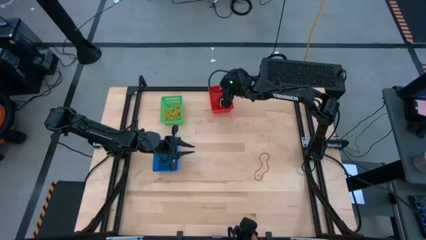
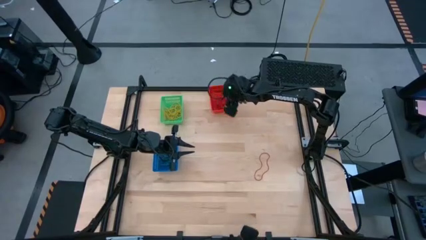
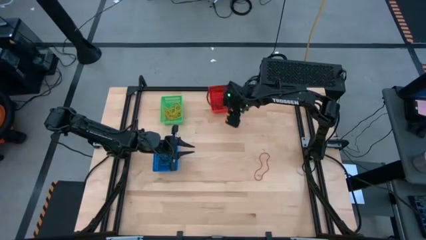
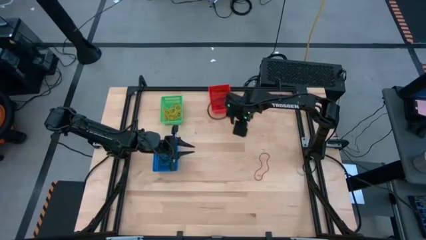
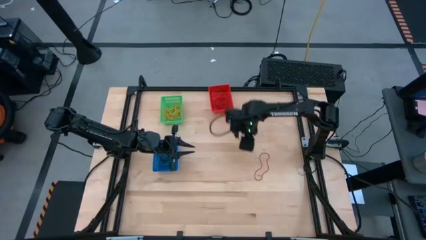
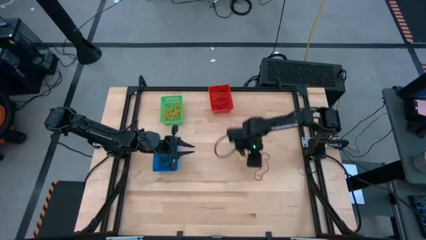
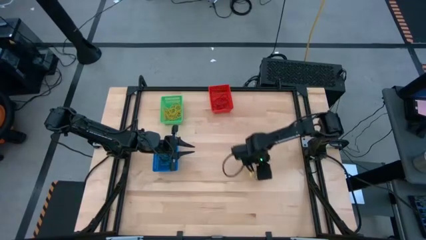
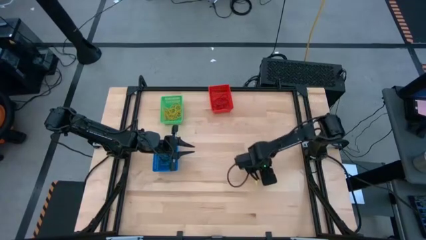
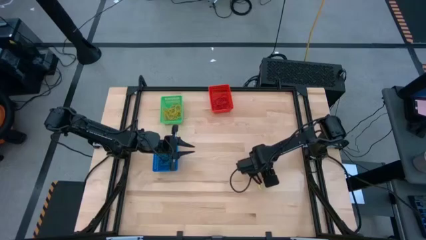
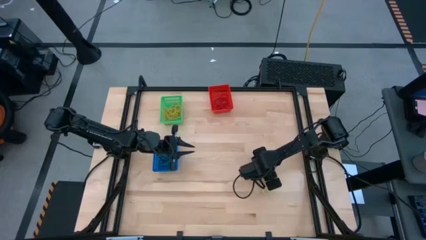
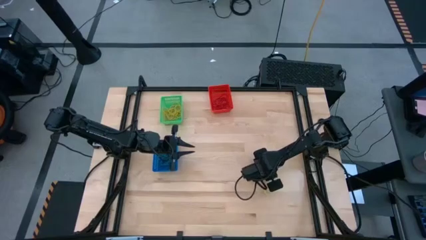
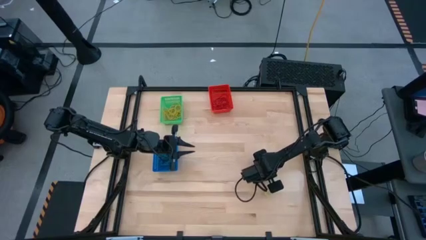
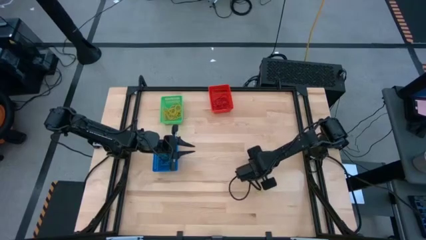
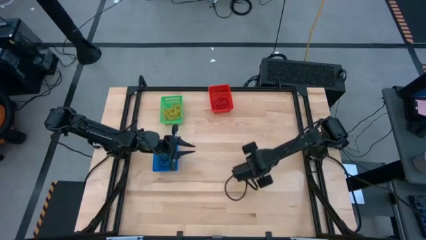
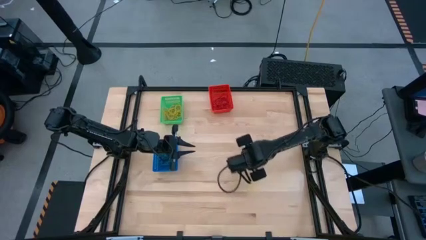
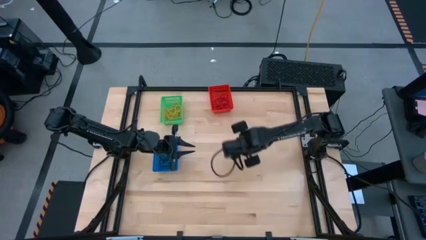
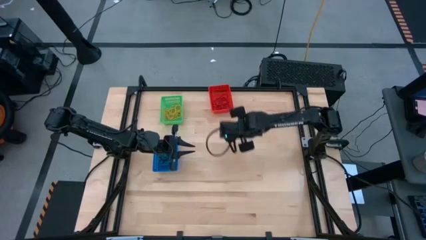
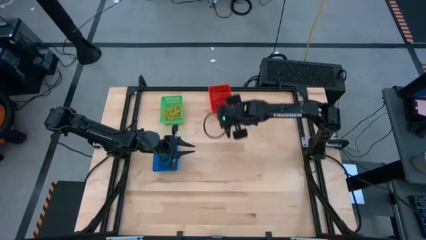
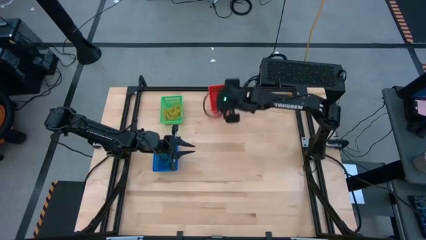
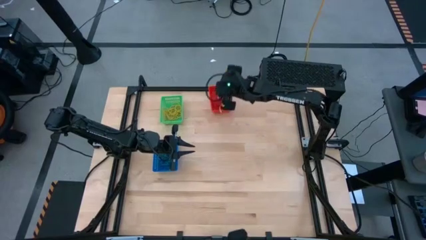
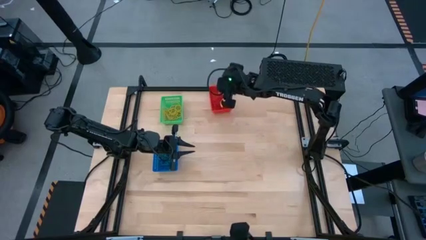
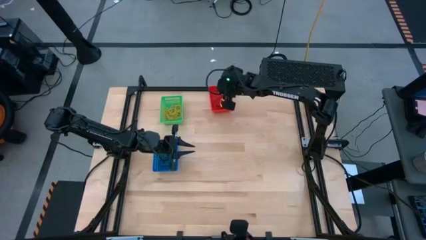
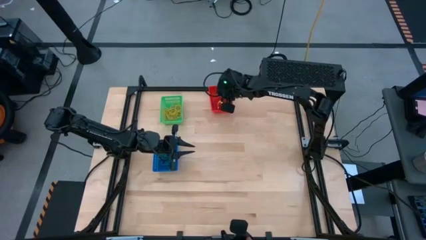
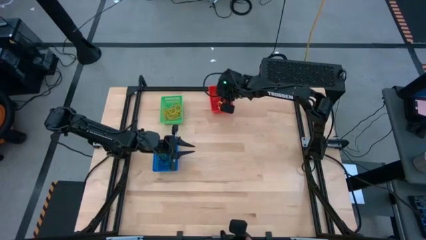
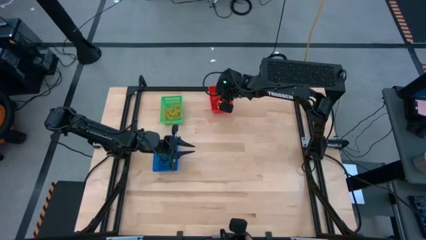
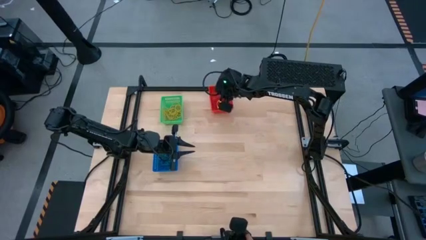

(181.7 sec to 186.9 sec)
Task: Sort rubber bands into baskets
Put the red rubber band into the red bin

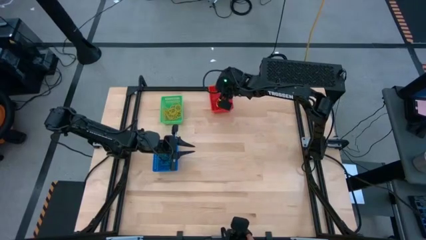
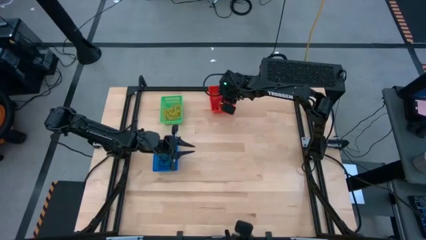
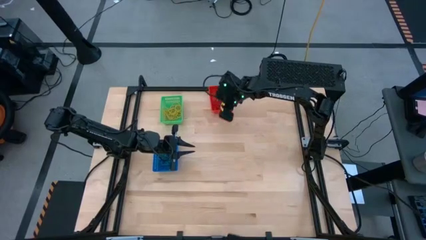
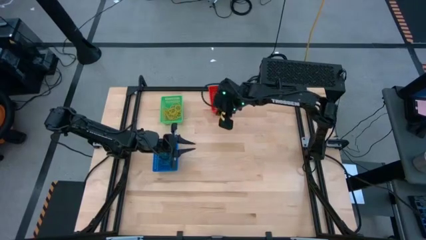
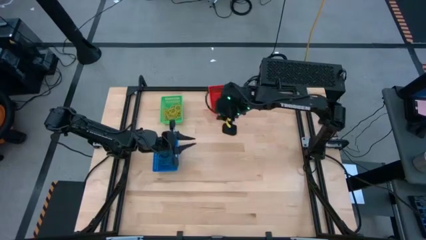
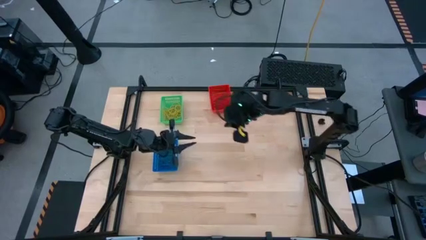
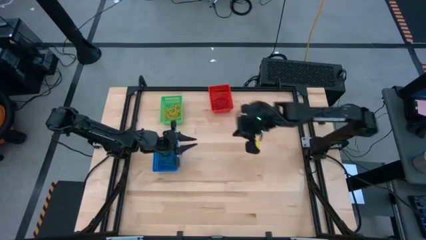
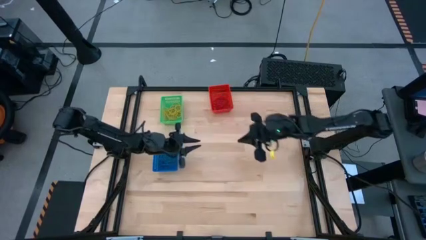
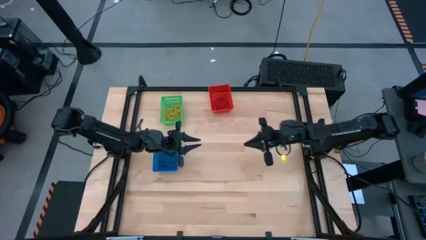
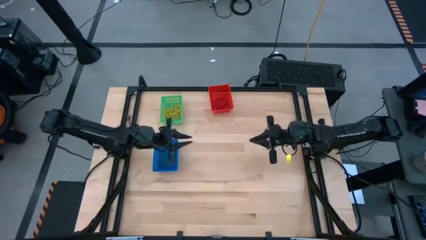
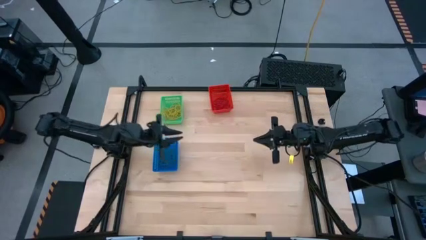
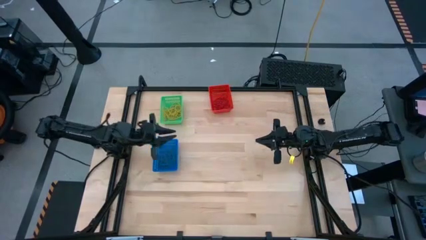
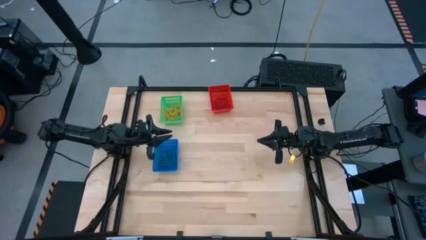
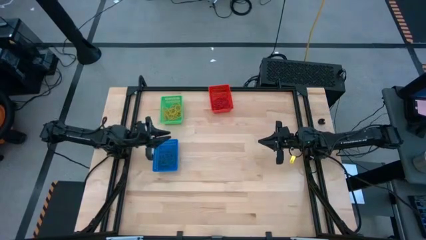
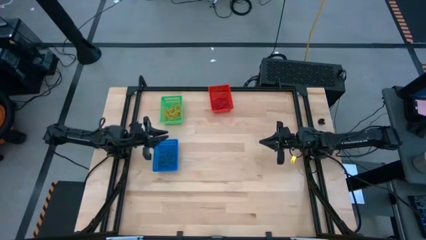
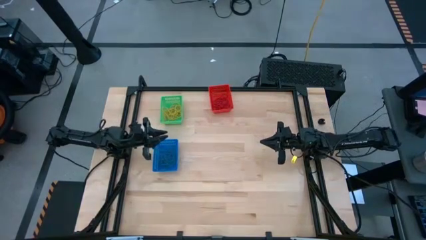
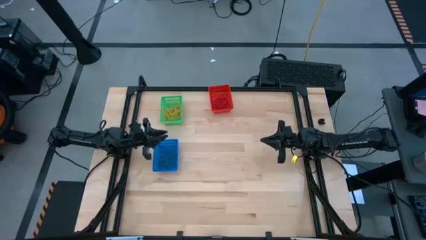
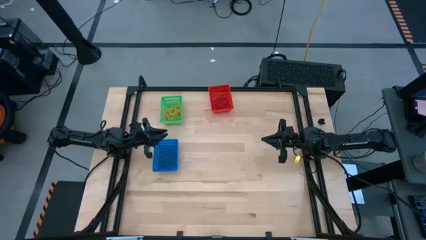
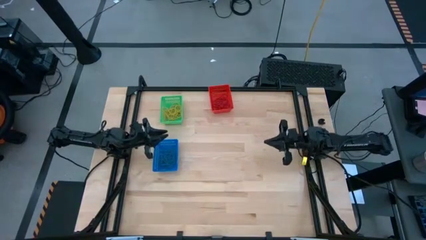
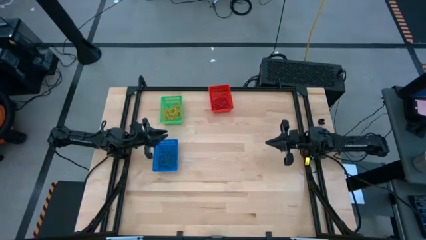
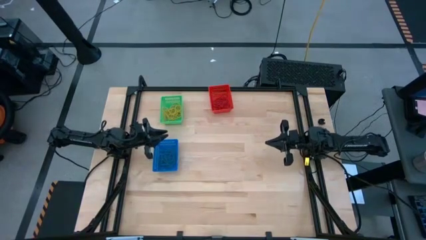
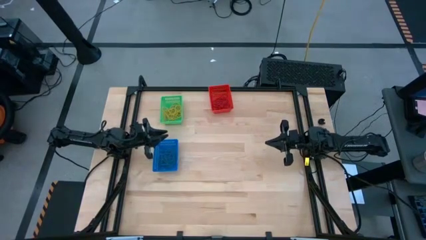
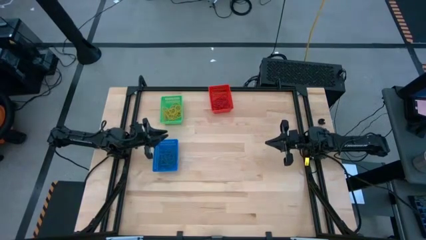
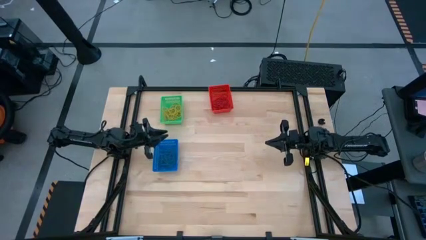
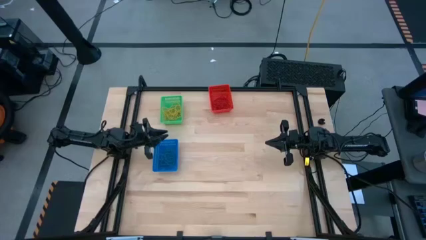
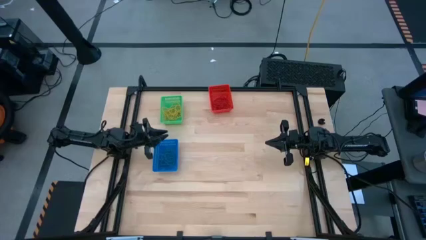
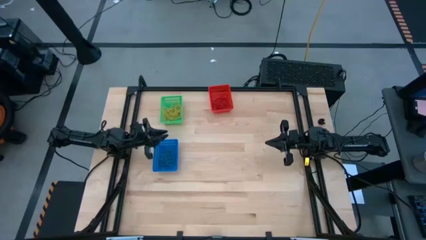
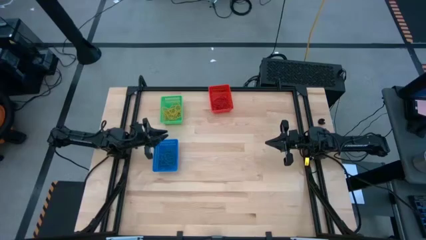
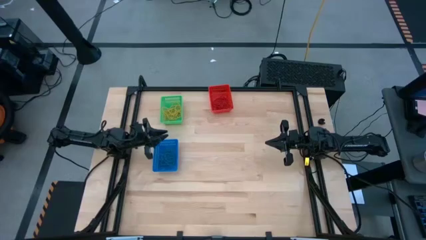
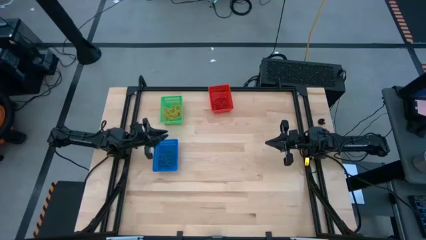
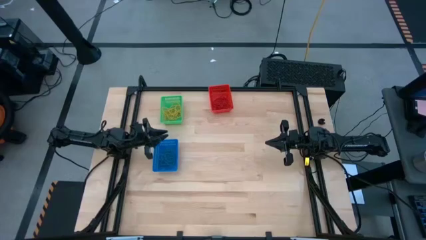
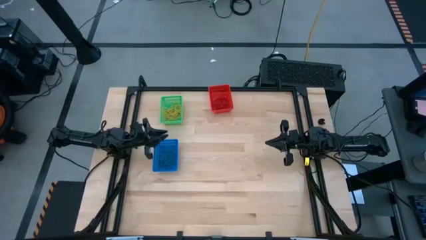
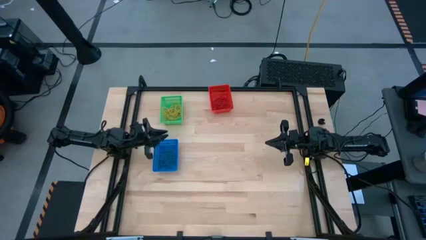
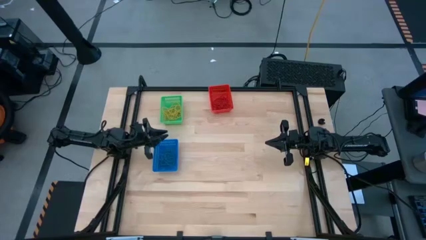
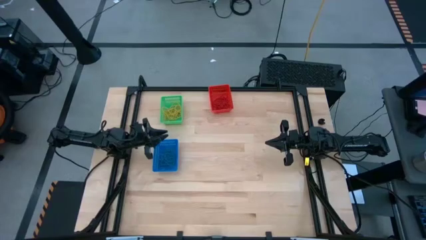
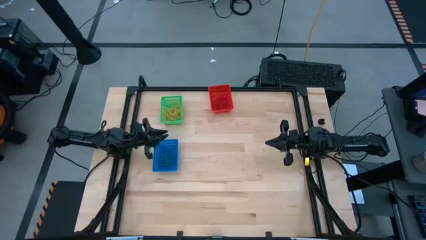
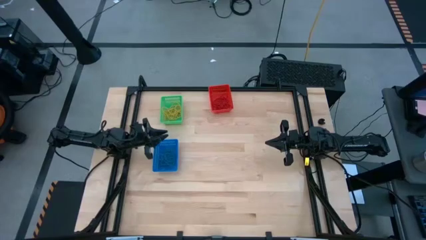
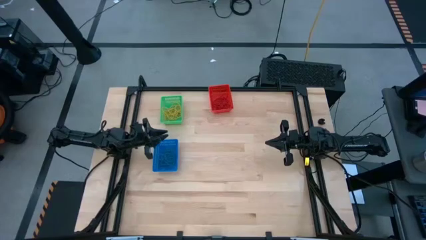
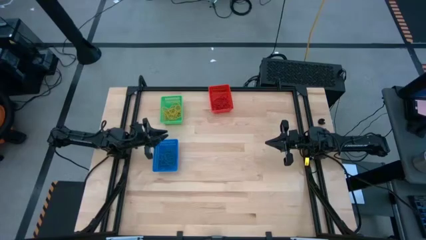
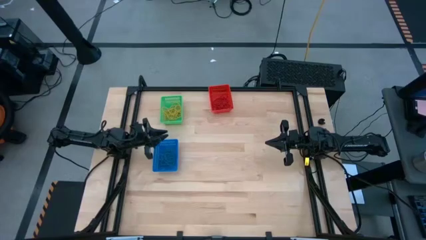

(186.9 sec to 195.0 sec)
Return to Home Position

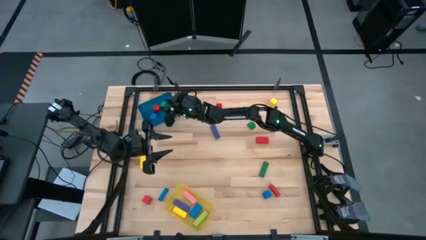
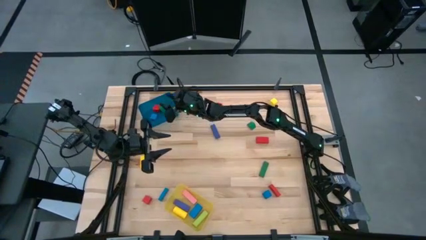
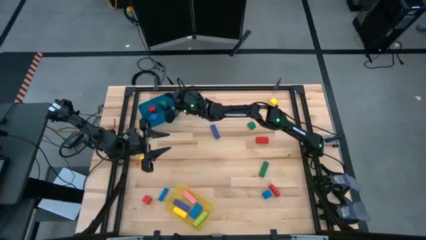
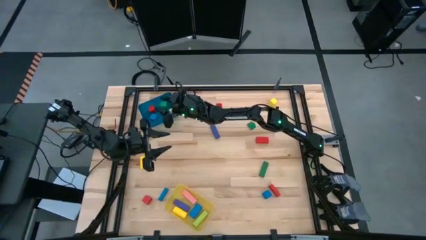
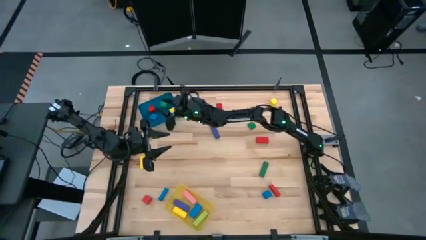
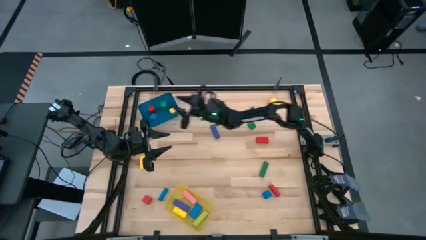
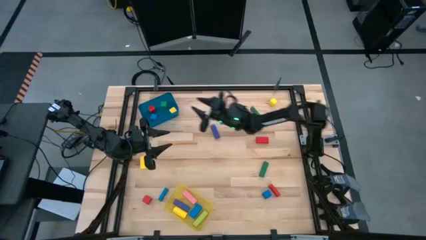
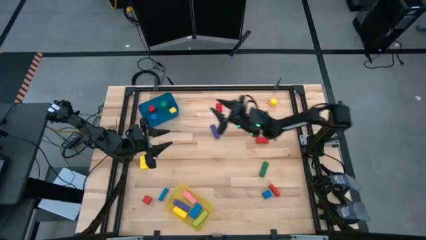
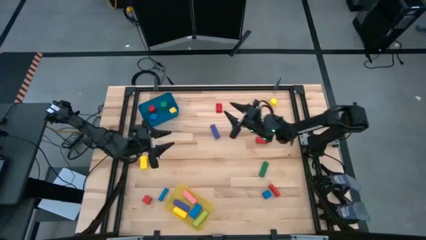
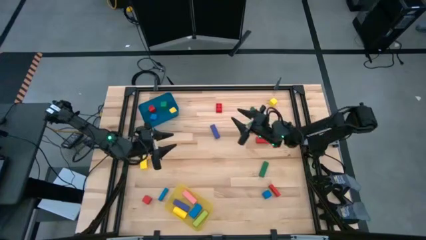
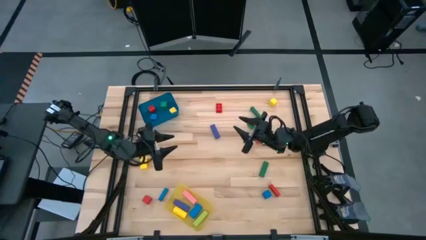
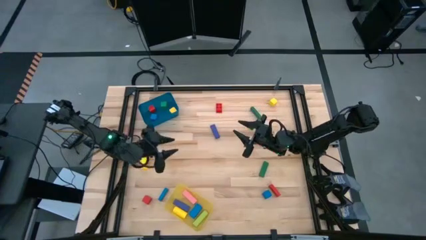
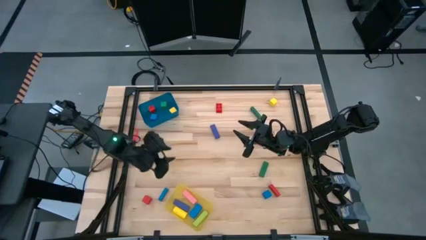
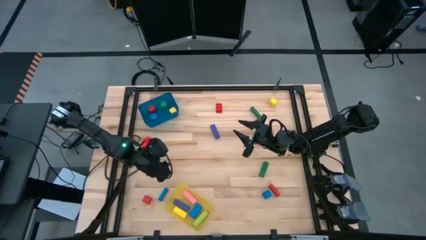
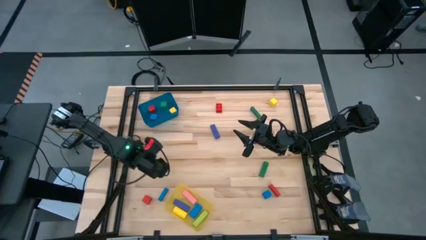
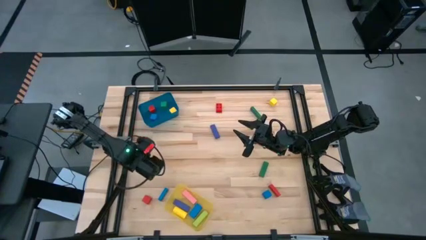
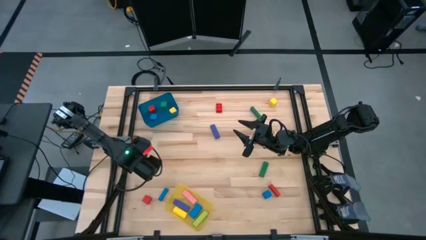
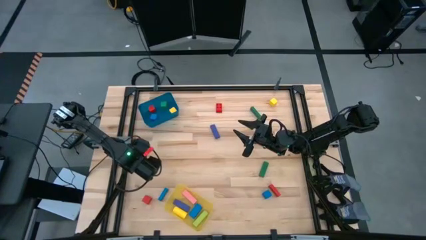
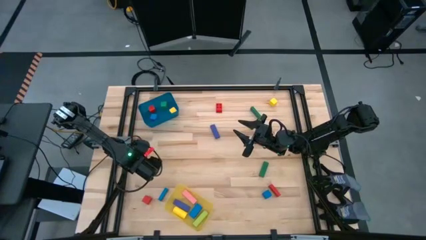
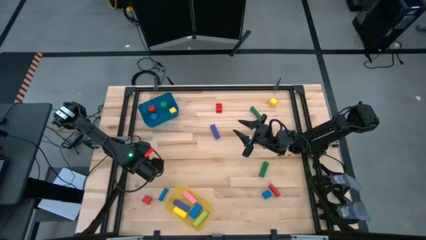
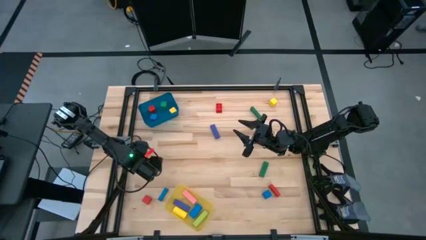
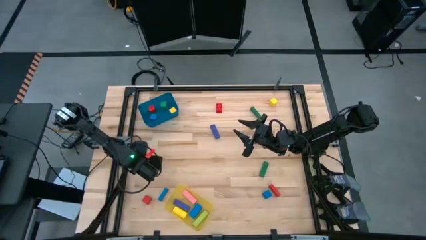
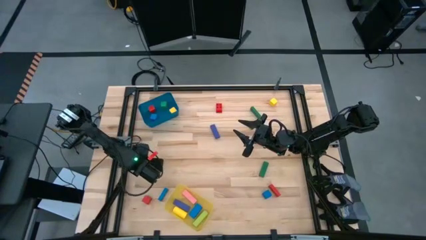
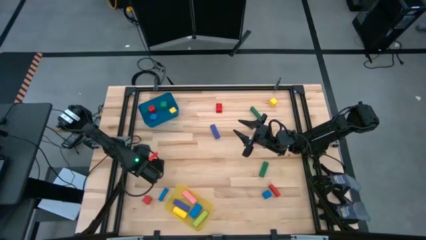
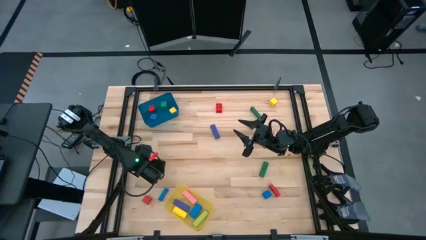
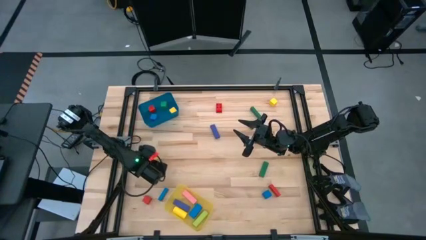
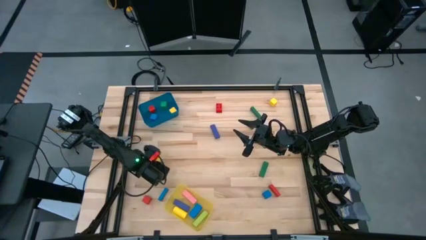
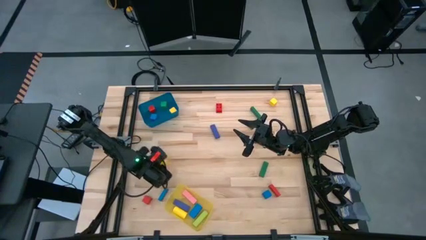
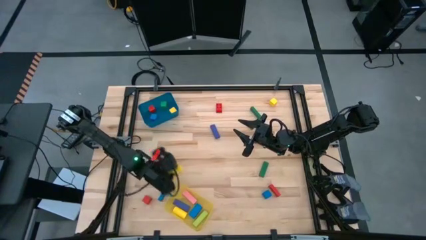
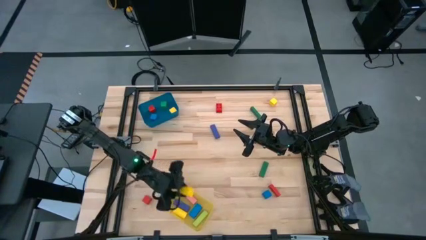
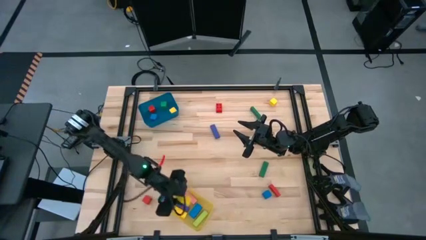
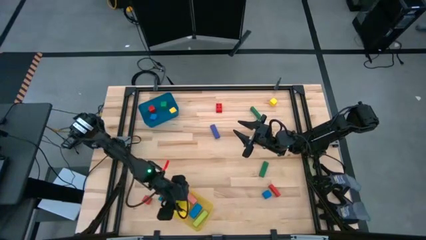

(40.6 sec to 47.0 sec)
Task: Sort blocks by size
Put the large yellow block into the yellow bin
